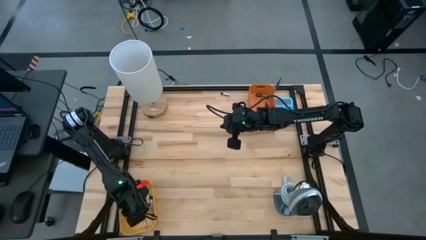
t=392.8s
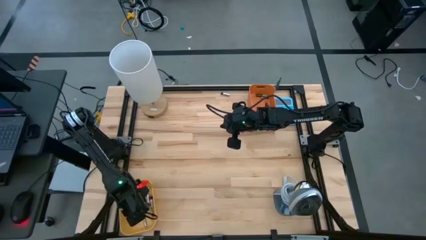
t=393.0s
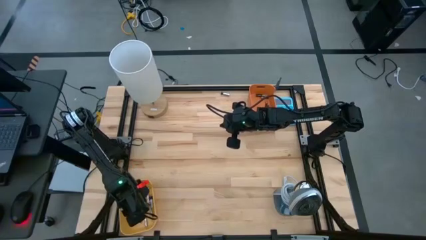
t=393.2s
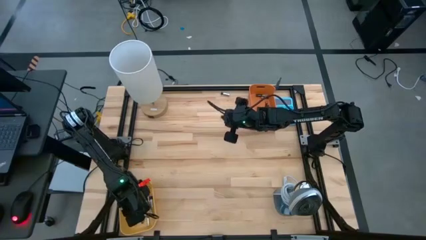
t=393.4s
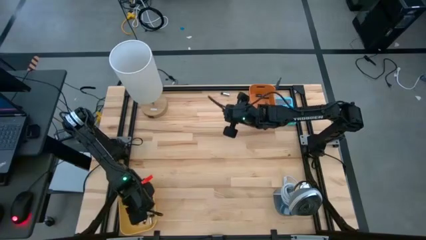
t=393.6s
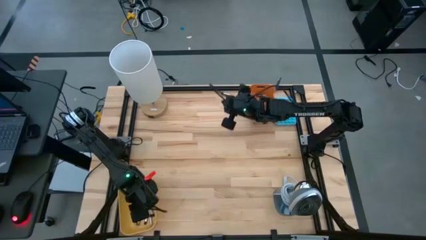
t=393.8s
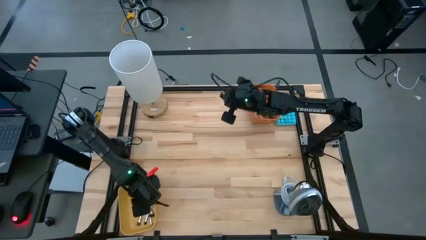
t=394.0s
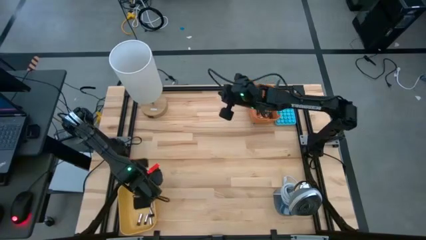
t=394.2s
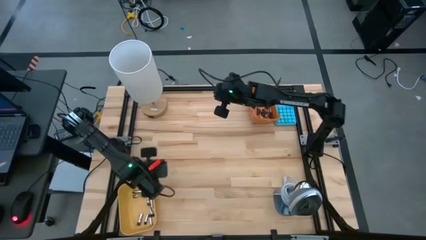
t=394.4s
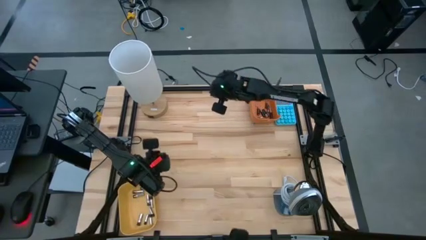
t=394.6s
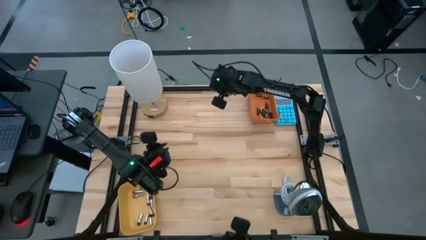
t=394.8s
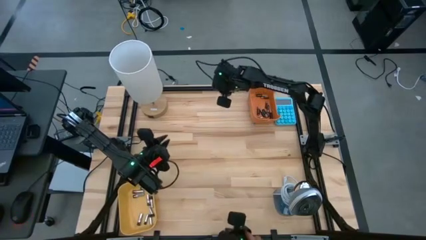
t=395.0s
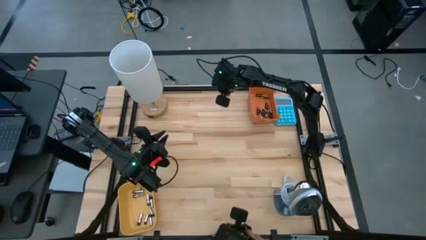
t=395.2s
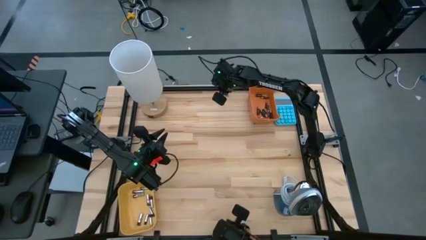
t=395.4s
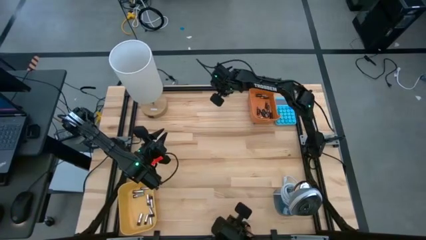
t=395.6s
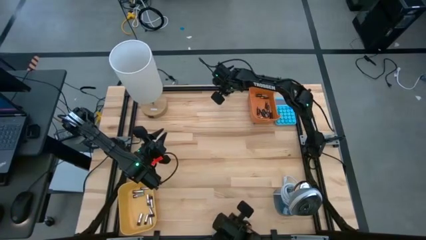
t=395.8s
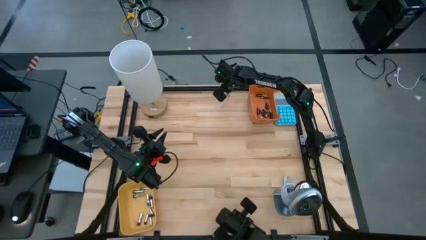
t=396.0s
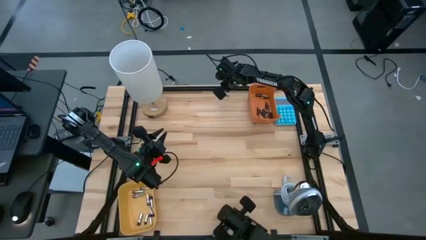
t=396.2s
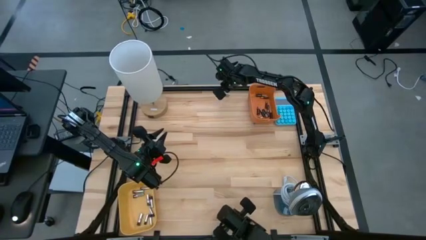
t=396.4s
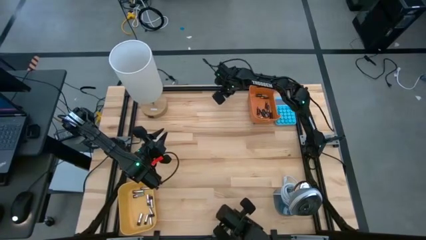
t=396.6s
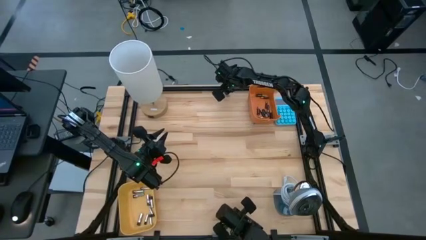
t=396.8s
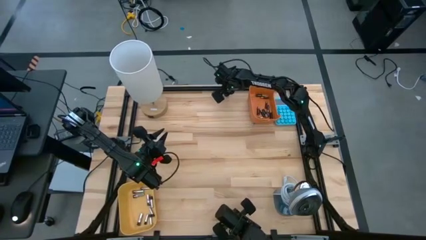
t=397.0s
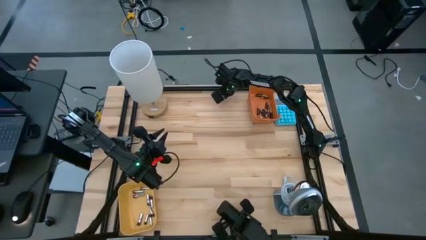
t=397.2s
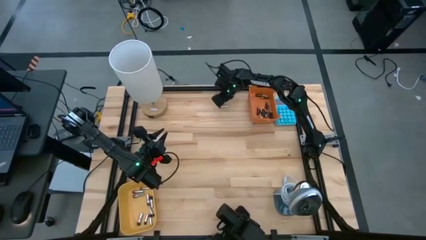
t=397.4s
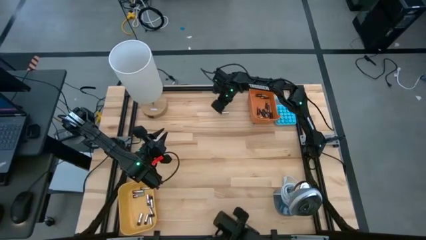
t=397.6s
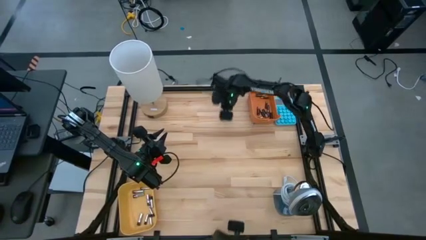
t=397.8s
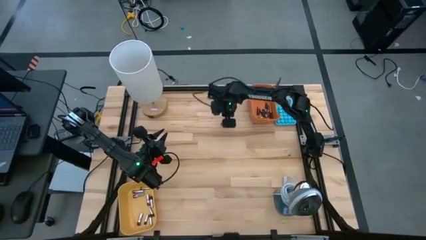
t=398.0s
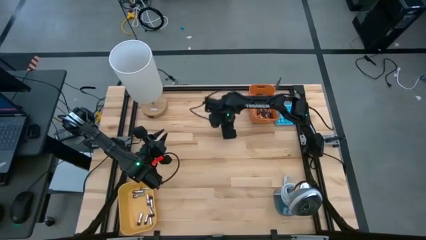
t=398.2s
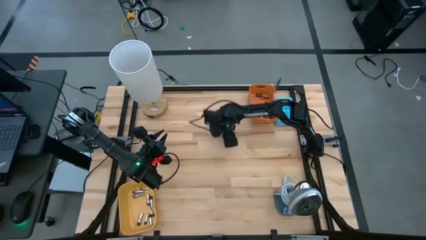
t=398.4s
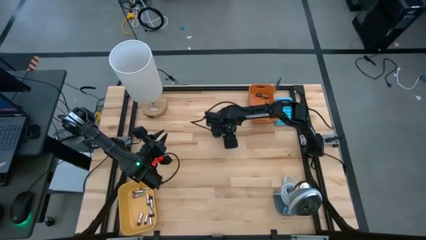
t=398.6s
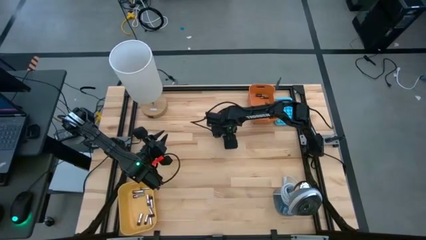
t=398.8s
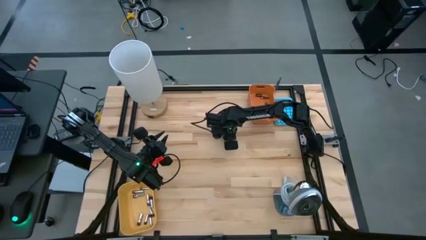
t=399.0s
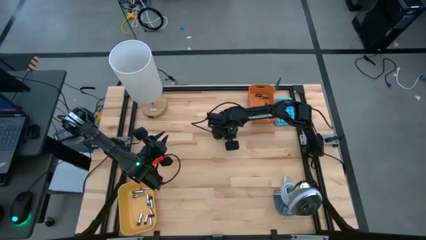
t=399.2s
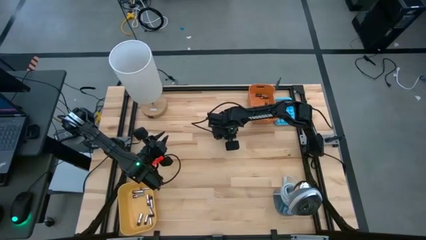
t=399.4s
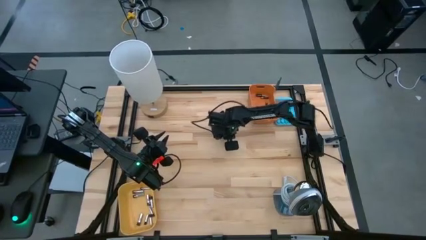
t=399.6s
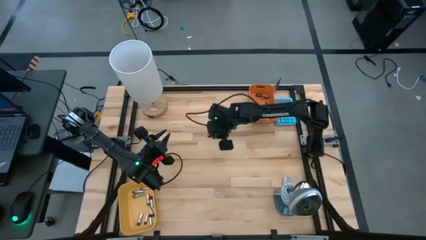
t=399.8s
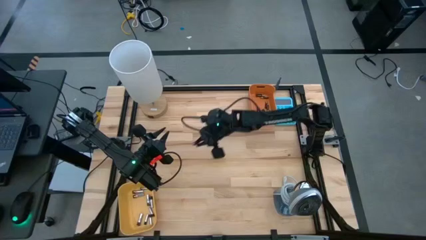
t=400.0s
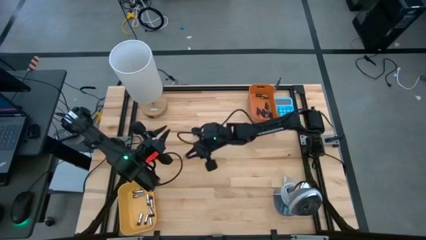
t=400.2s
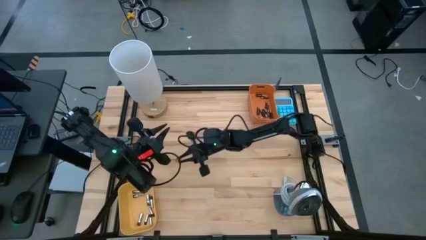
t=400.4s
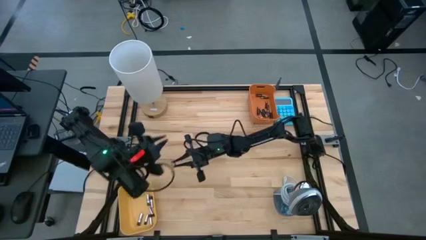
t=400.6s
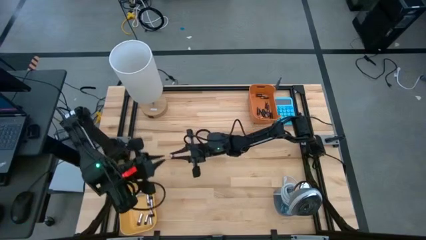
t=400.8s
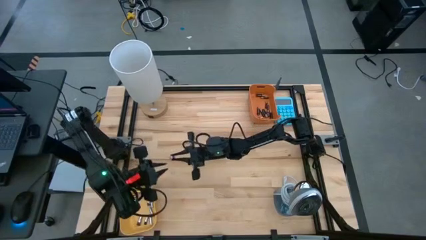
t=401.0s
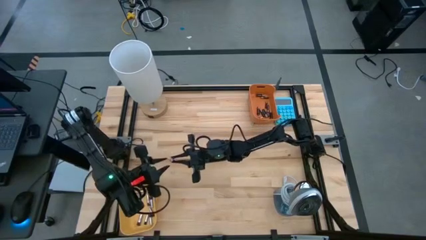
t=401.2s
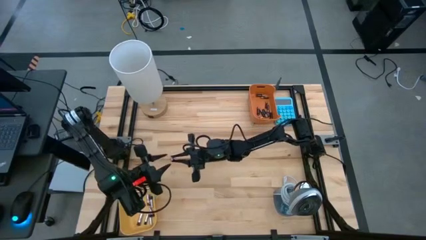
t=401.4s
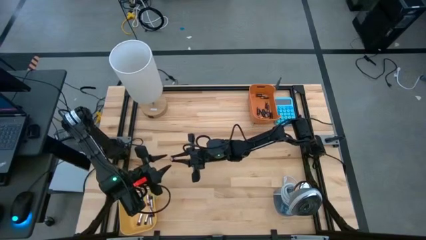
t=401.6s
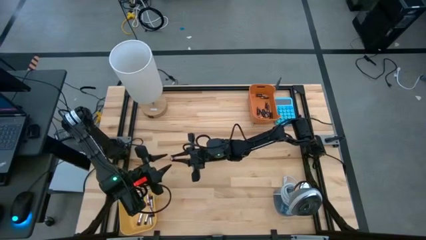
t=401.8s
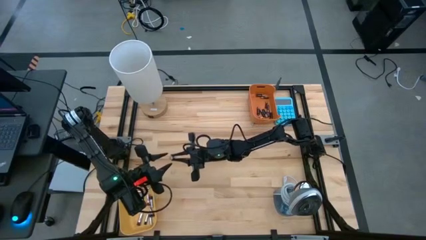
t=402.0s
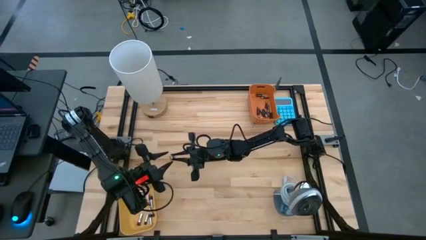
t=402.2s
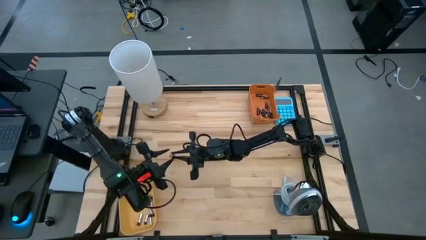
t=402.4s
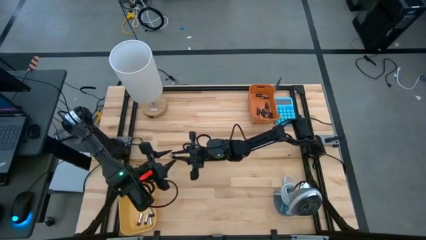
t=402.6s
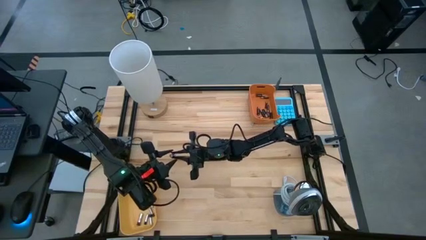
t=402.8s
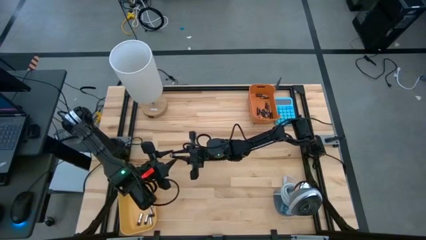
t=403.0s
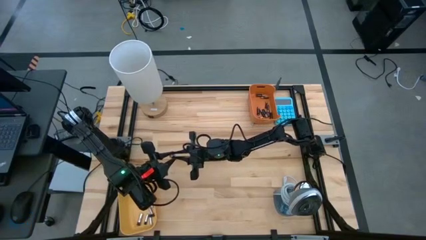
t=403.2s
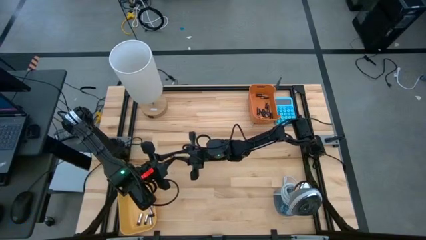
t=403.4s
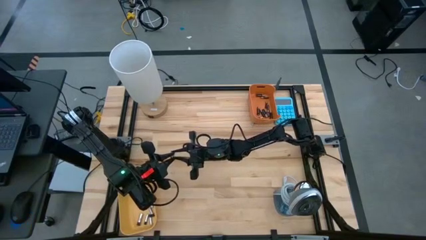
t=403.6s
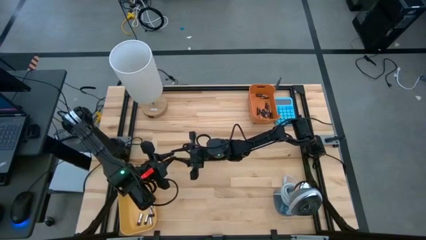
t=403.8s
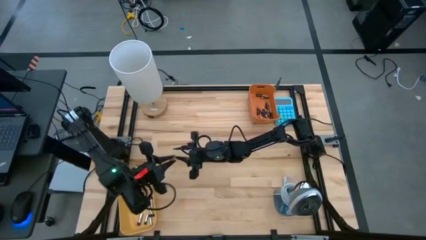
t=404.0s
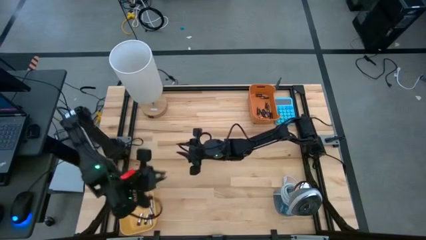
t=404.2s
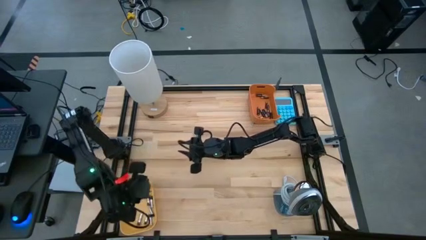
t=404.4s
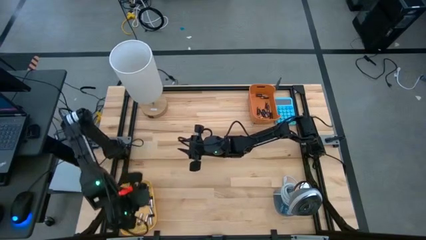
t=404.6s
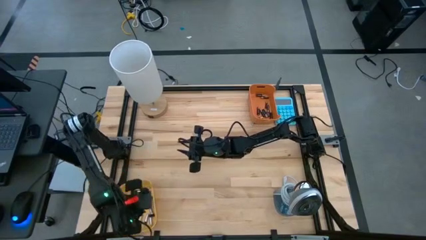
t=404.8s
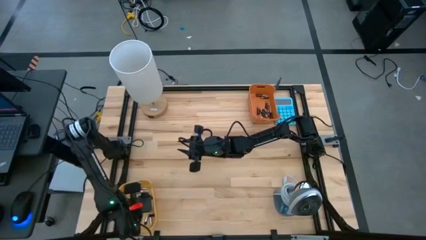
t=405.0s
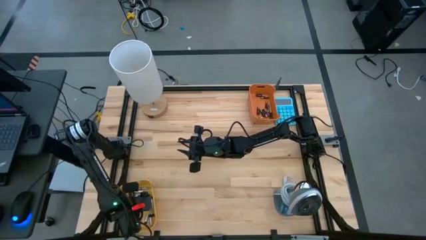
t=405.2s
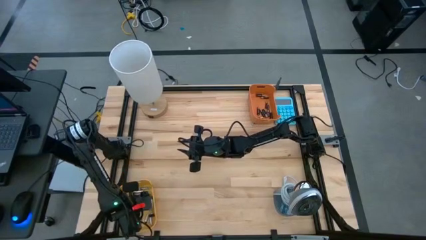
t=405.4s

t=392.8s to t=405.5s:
Task: Sort batteries
Put the silver battery into the yellow bin

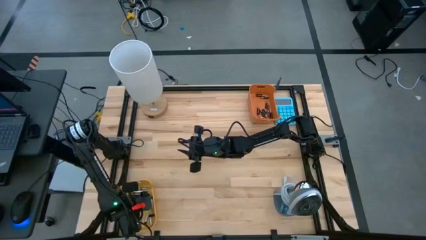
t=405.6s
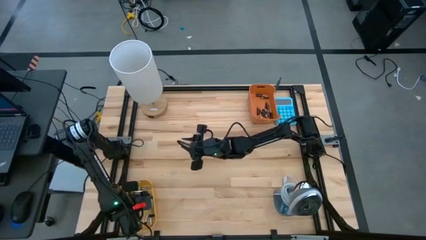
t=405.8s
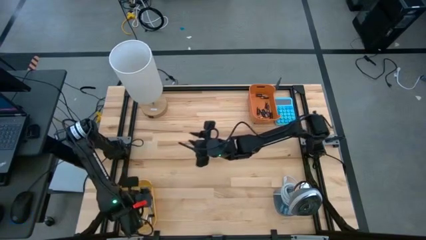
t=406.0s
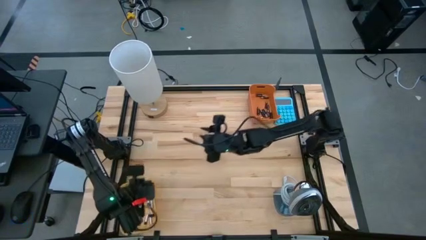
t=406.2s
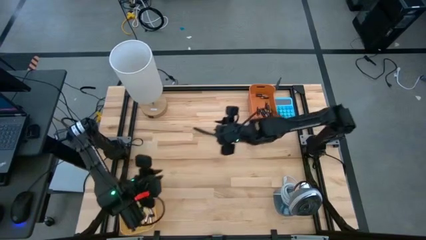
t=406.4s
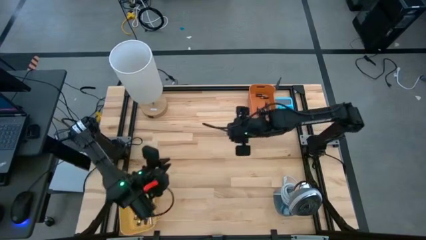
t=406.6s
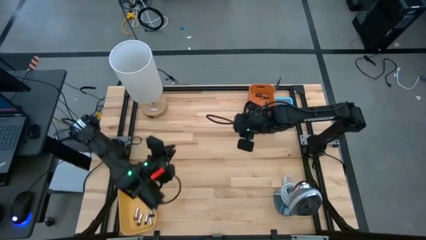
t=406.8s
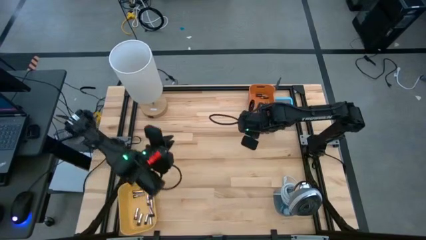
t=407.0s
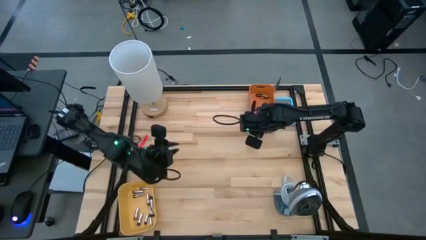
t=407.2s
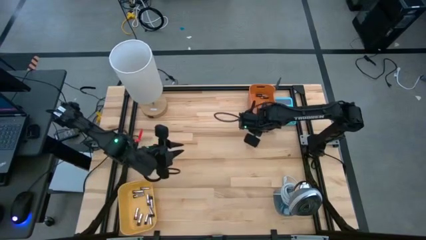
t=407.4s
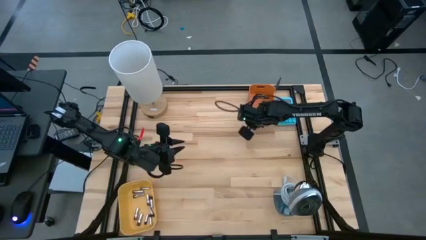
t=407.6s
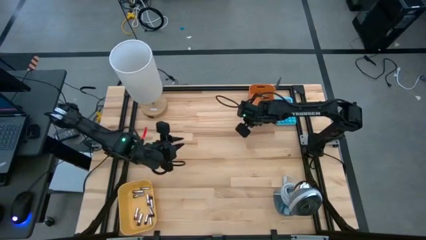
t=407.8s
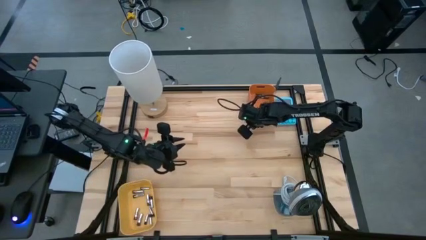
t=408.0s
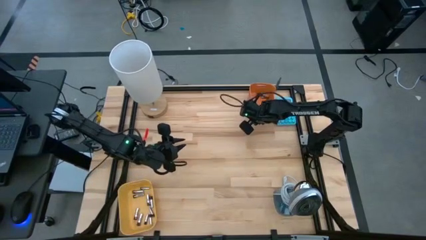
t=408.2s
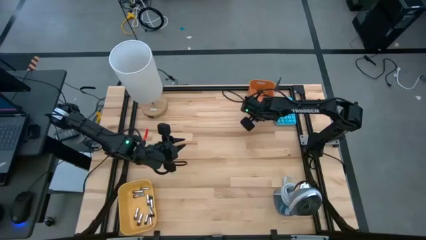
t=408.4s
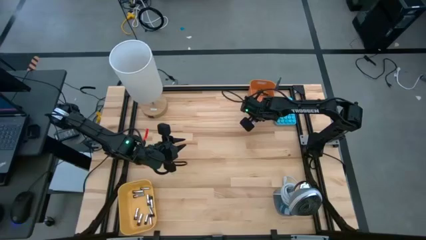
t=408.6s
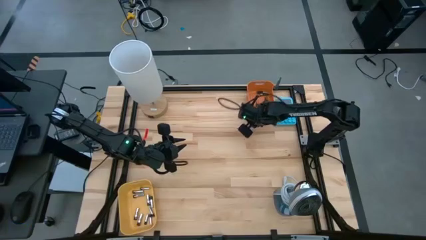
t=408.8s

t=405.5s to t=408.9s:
Adjust the orange bin
